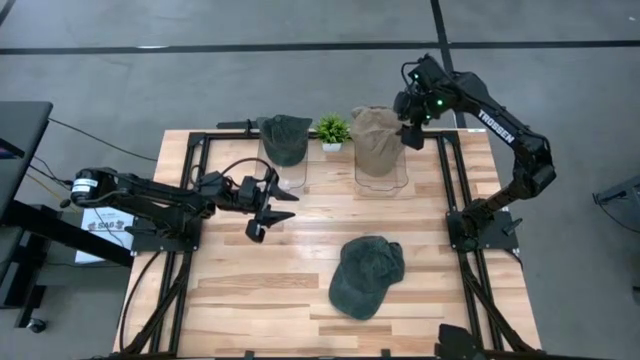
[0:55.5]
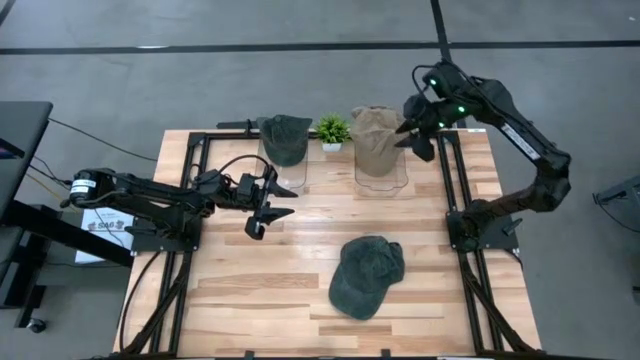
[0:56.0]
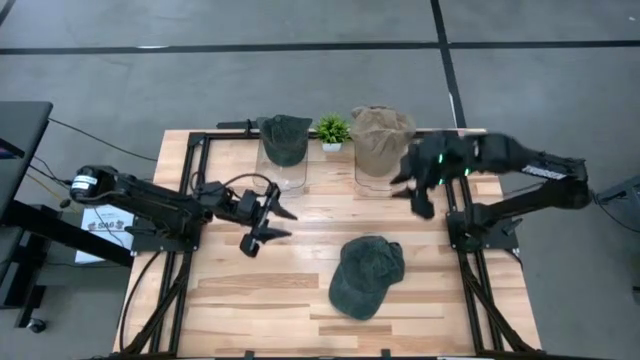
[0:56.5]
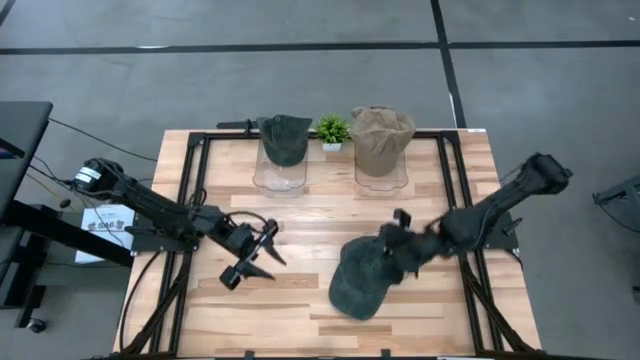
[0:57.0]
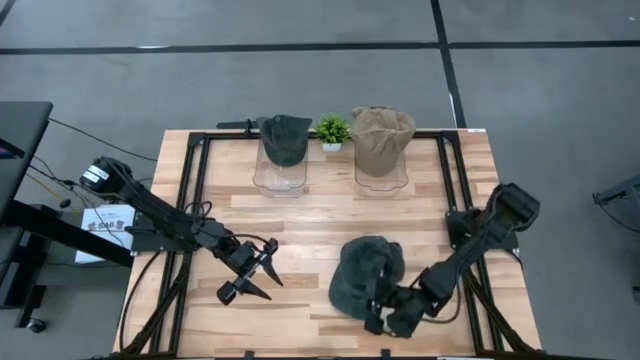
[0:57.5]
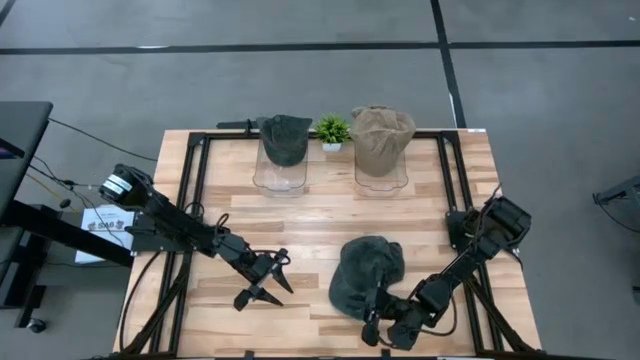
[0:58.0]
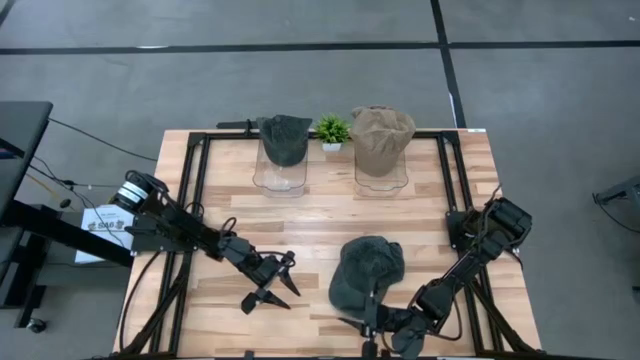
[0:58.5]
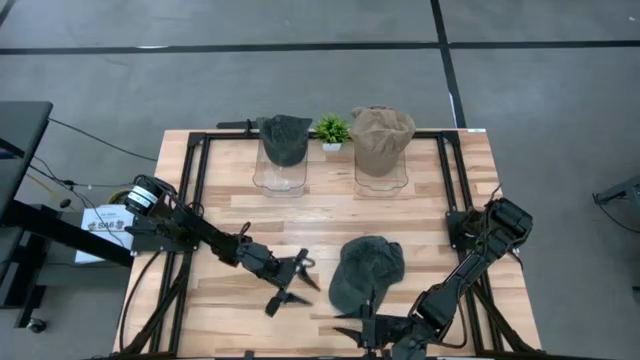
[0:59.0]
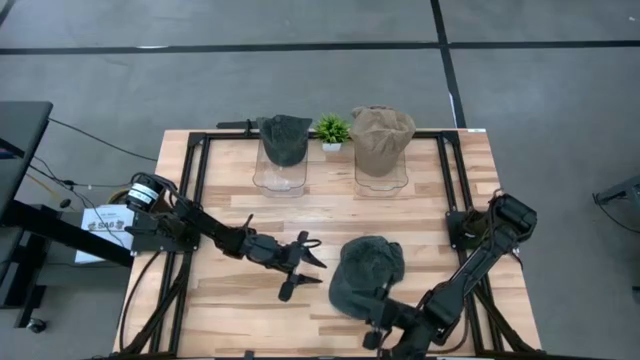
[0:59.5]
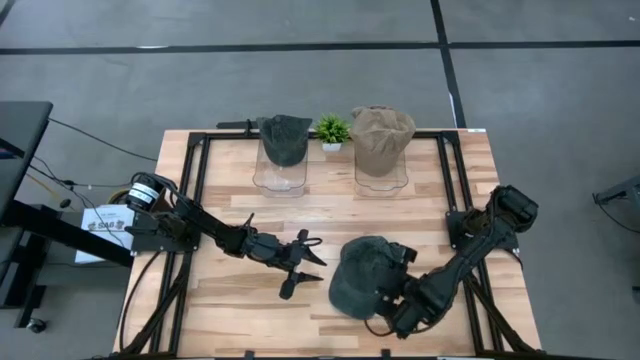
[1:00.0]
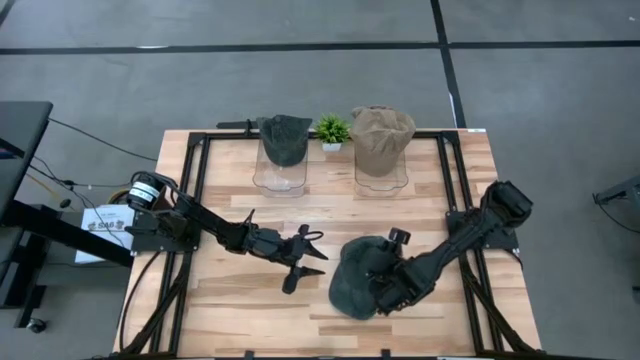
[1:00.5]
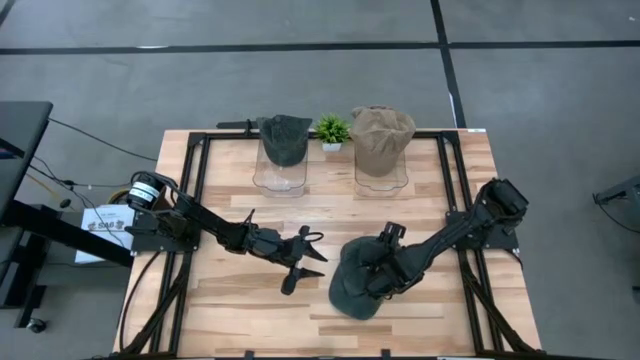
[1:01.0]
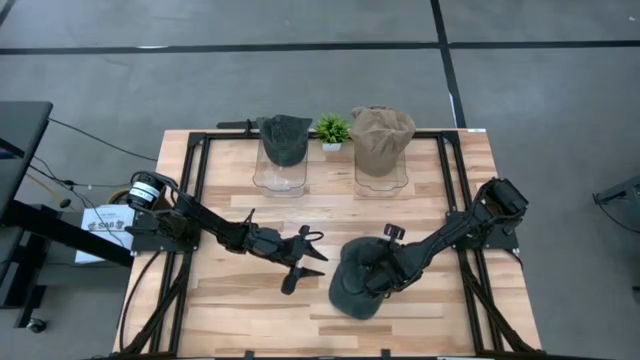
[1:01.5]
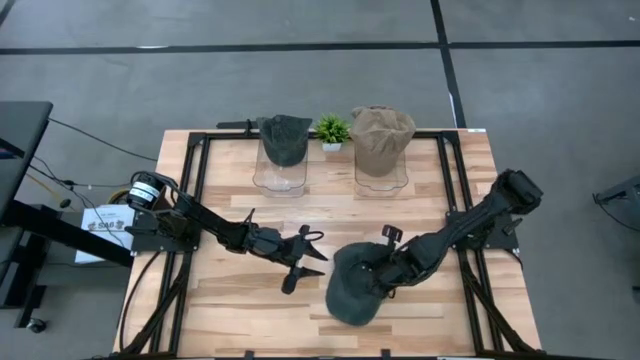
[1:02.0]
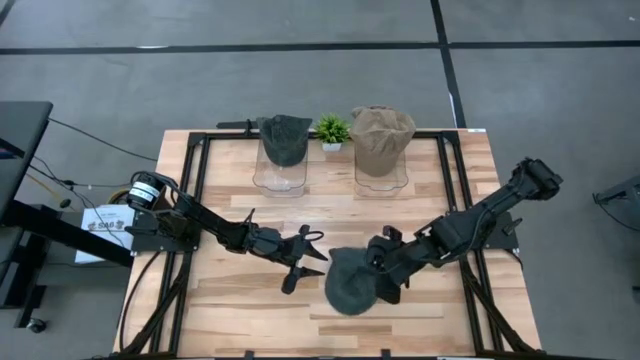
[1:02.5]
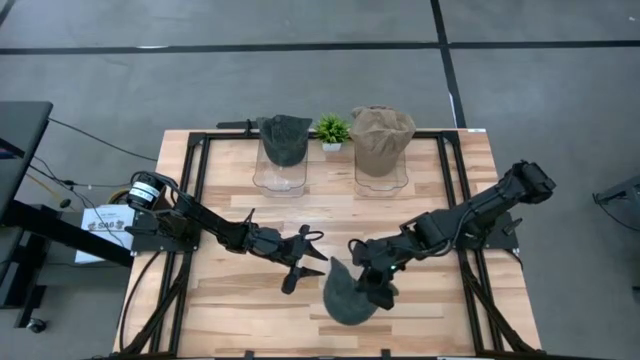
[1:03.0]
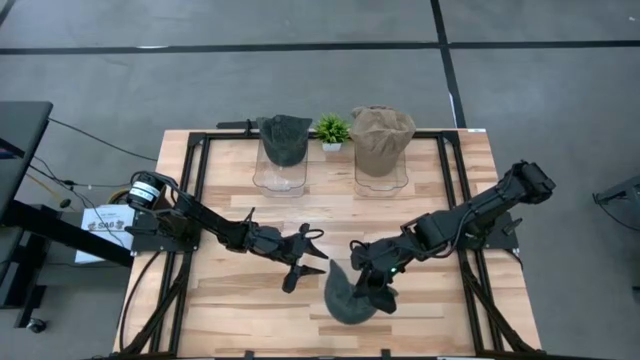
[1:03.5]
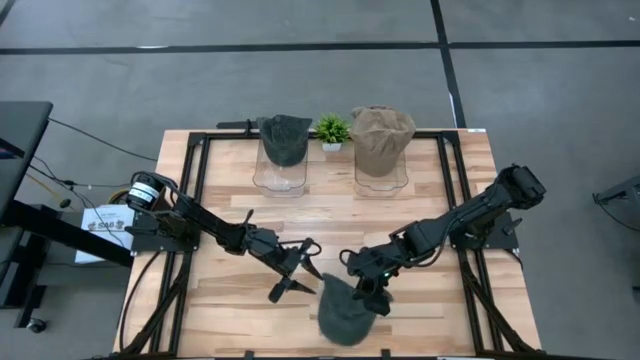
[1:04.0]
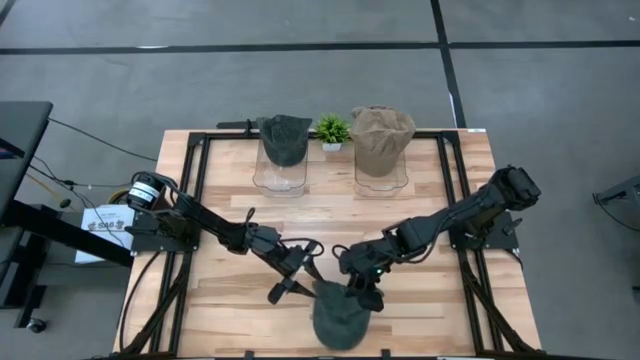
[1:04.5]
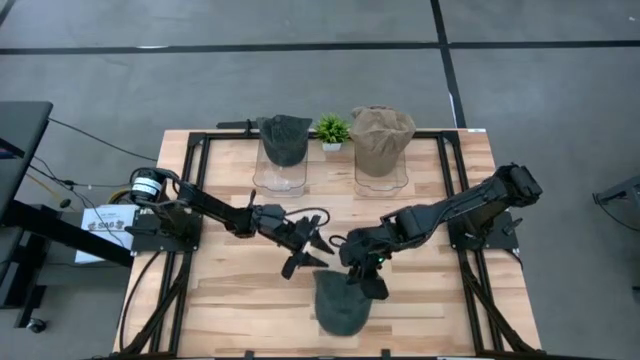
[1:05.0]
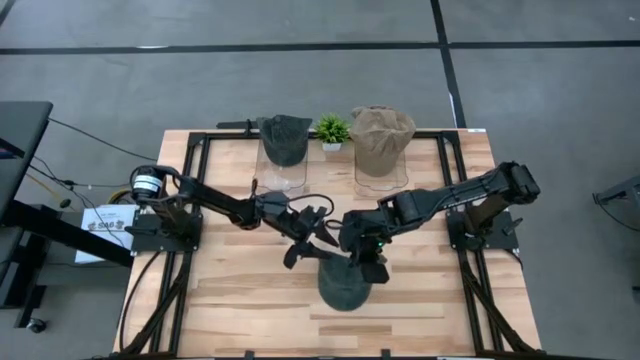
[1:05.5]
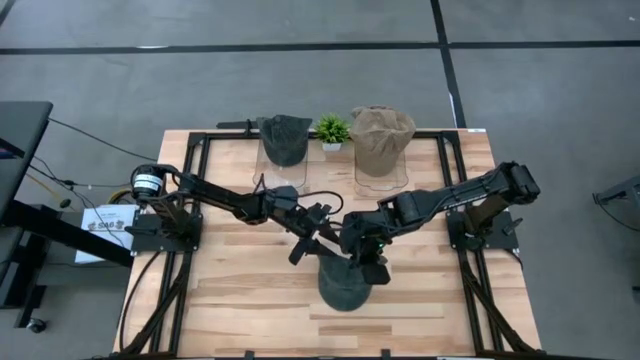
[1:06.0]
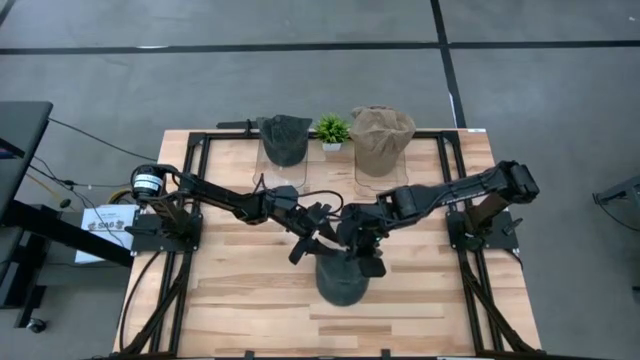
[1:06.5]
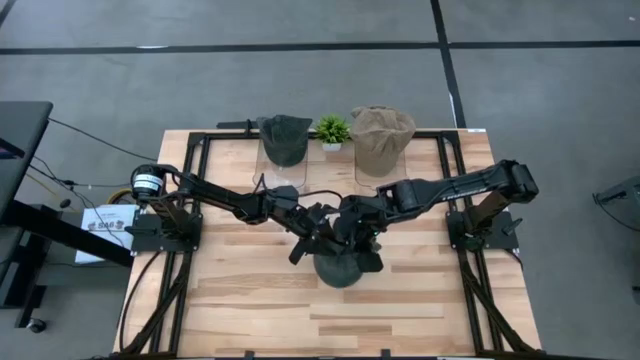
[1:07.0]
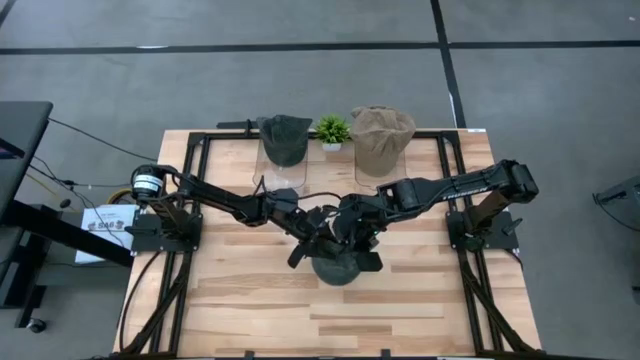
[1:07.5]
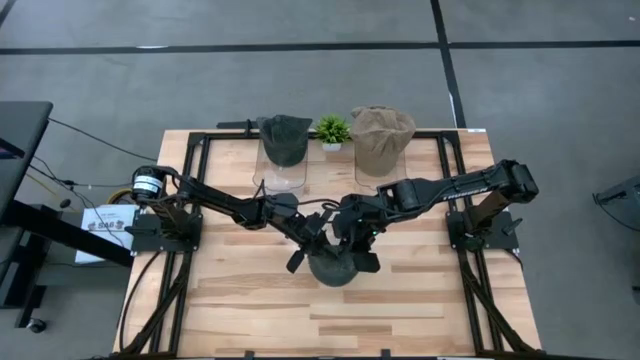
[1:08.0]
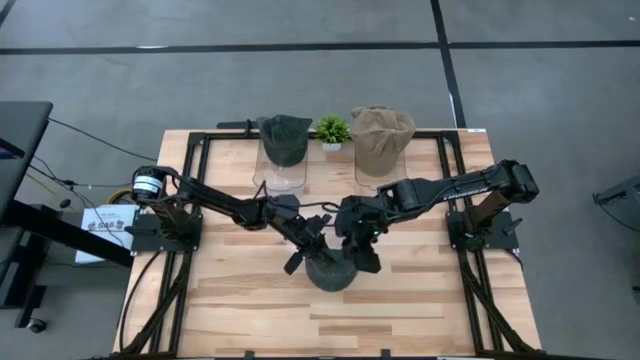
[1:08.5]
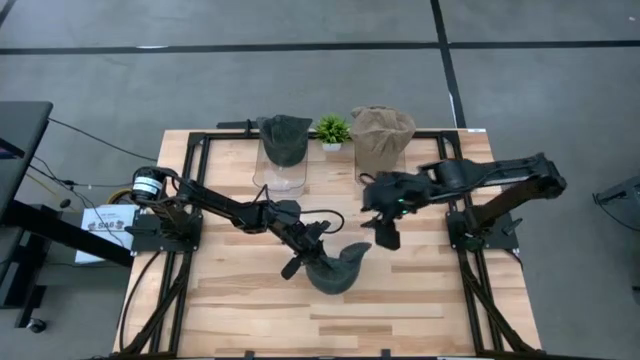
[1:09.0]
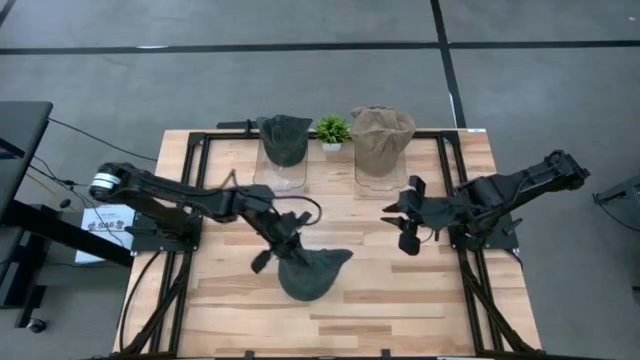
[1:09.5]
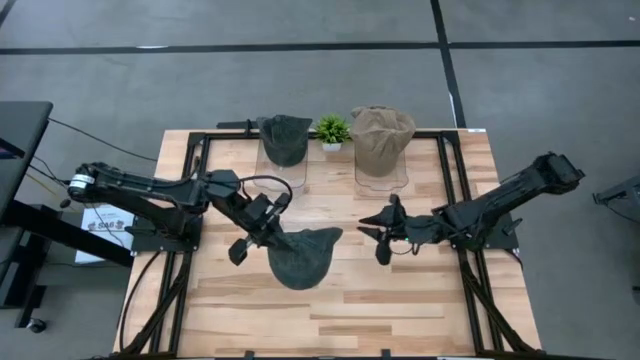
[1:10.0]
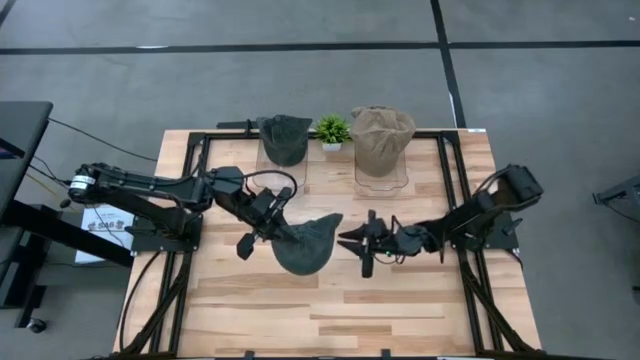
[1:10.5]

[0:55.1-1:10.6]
Task: Pick & Place hat
Put the blue cap into the left transparent bin

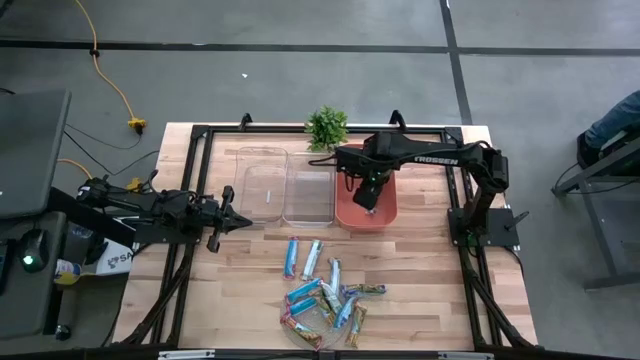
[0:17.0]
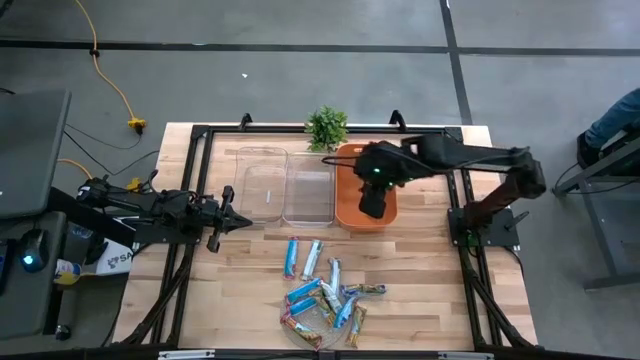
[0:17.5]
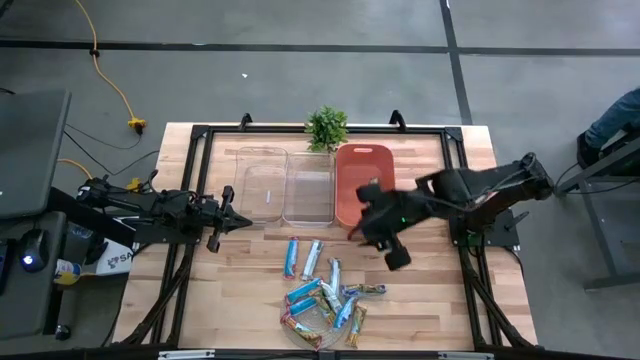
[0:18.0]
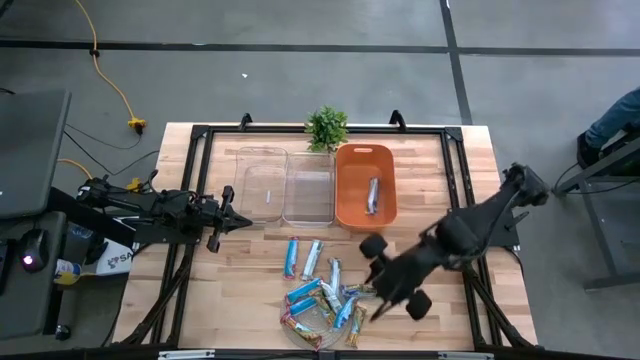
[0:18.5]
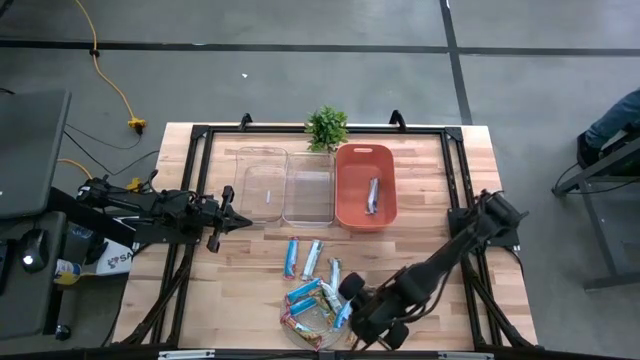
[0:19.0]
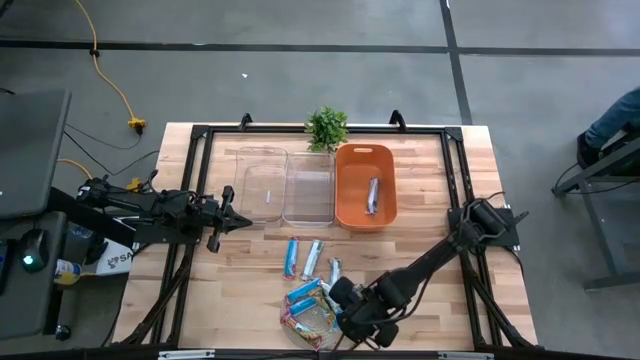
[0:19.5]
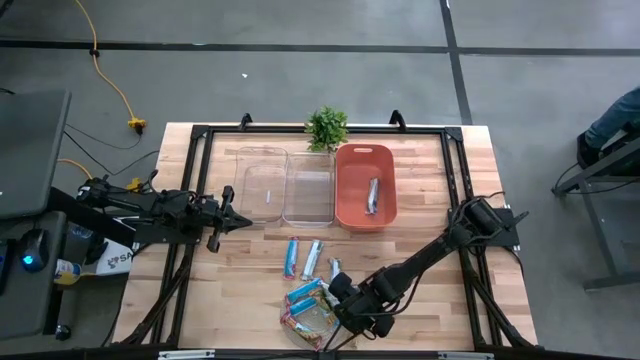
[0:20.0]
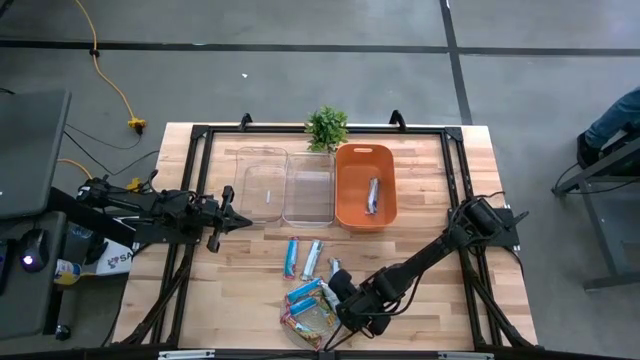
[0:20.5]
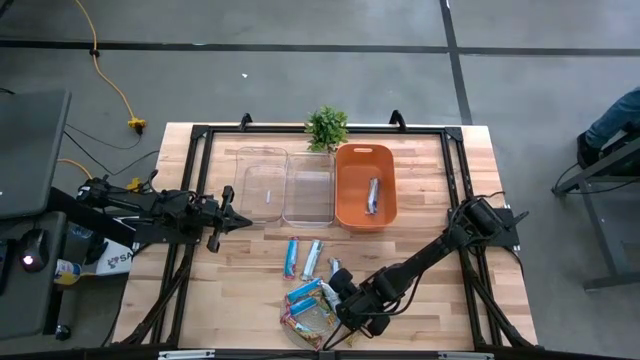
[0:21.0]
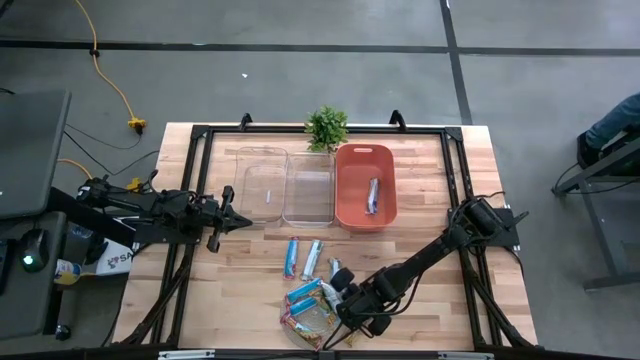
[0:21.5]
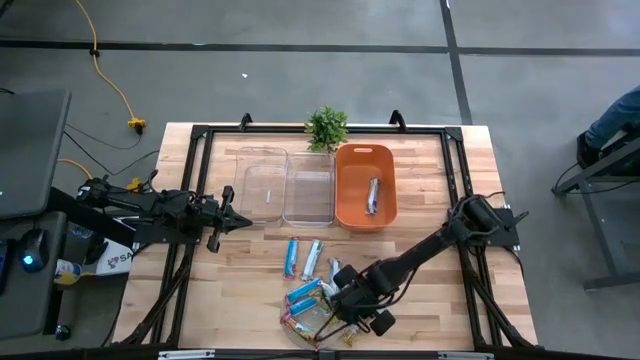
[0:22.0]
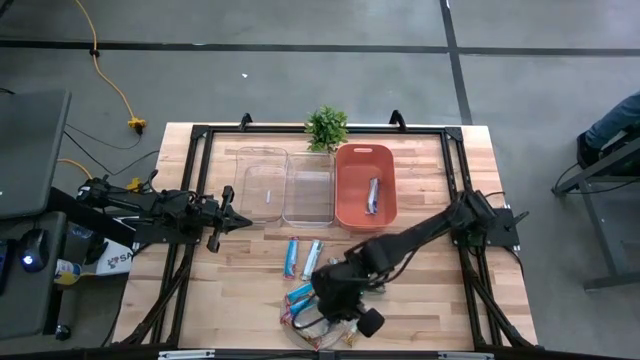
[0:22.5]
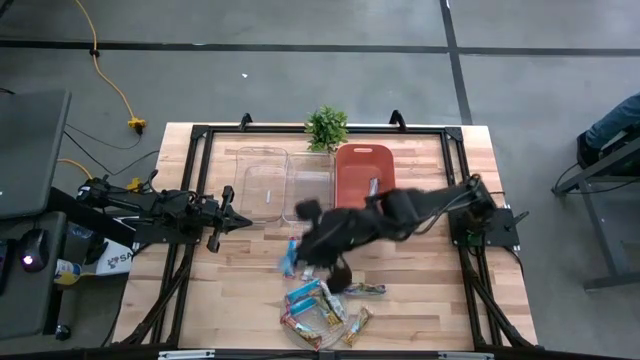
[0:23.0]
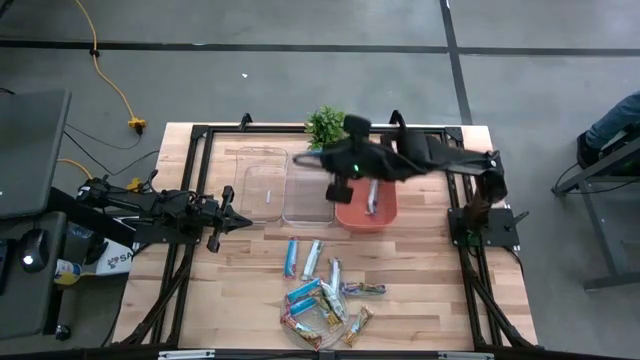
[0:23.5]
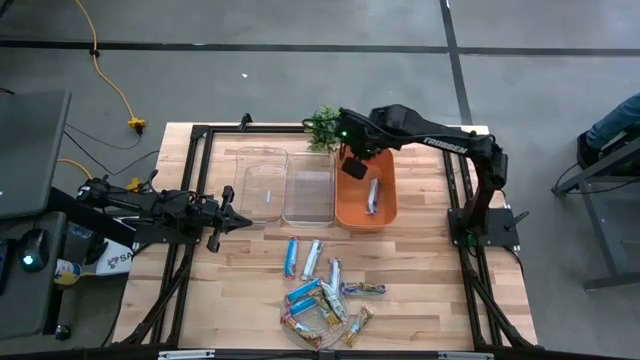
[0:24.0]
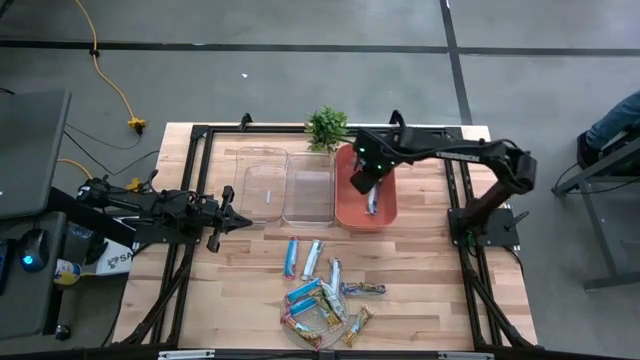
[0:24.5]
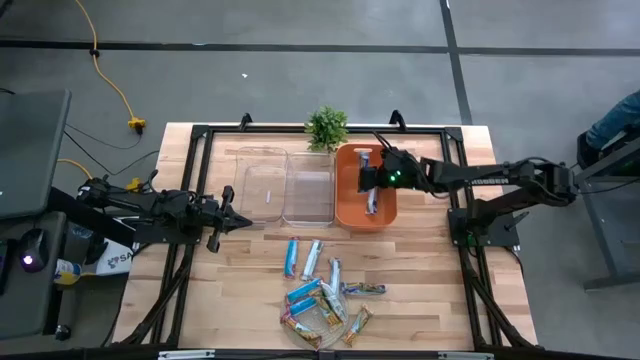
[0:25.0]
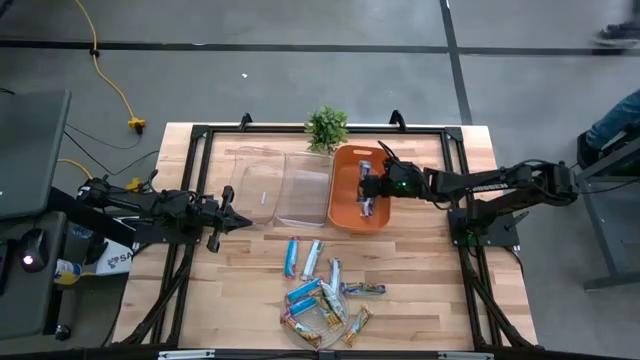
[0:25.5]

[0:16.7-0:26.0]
Task: Pick and place Granola Bars by type
Put the right green granola bar into the orange bin
